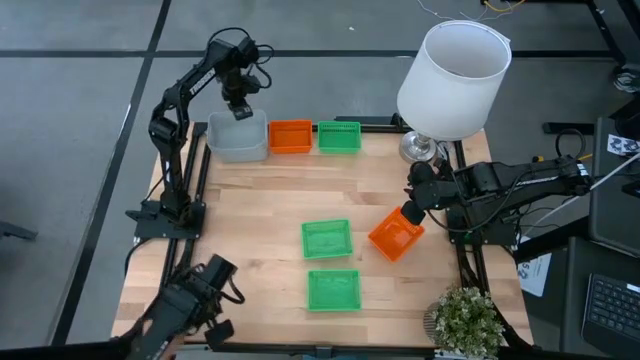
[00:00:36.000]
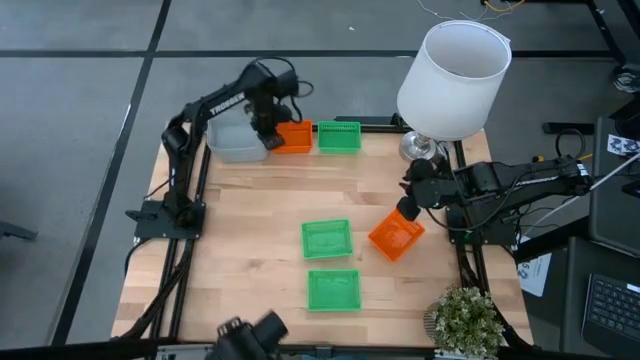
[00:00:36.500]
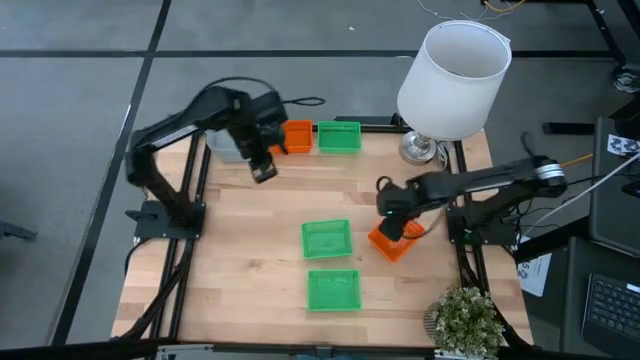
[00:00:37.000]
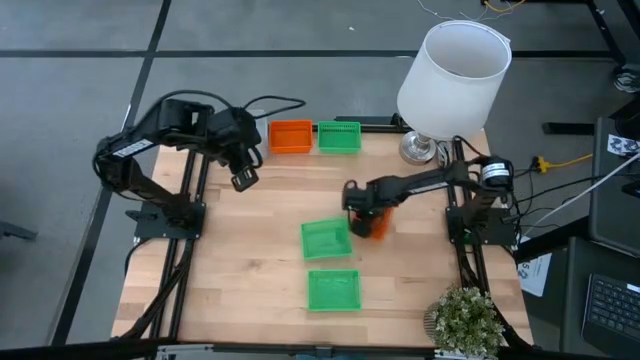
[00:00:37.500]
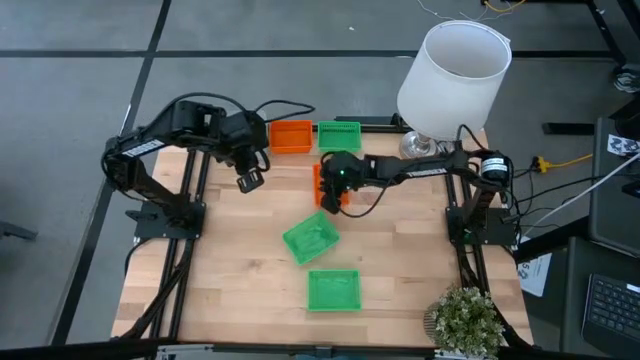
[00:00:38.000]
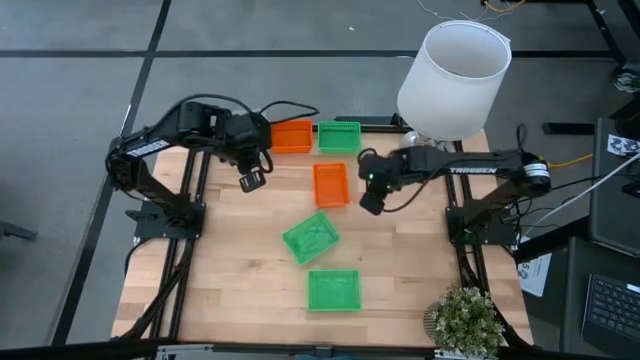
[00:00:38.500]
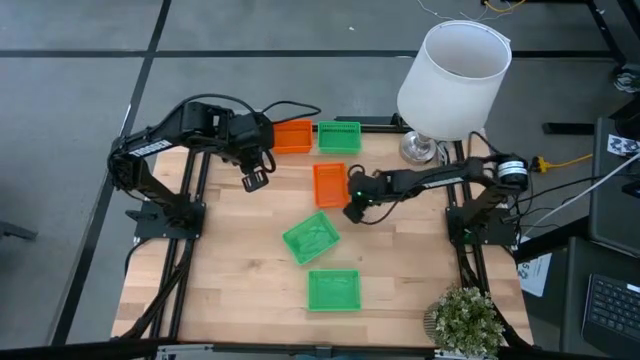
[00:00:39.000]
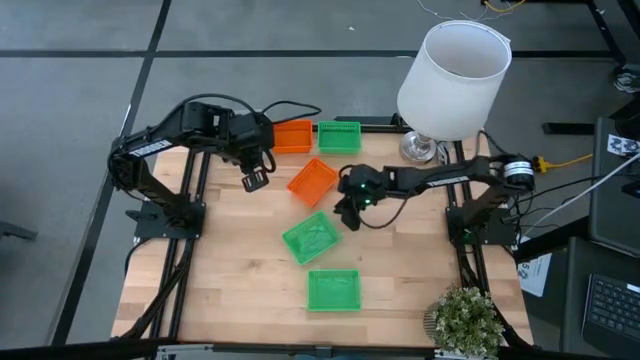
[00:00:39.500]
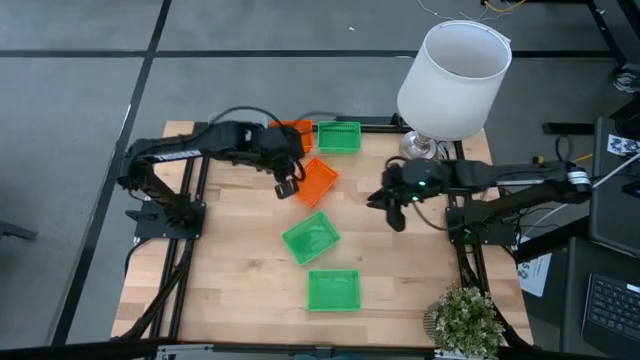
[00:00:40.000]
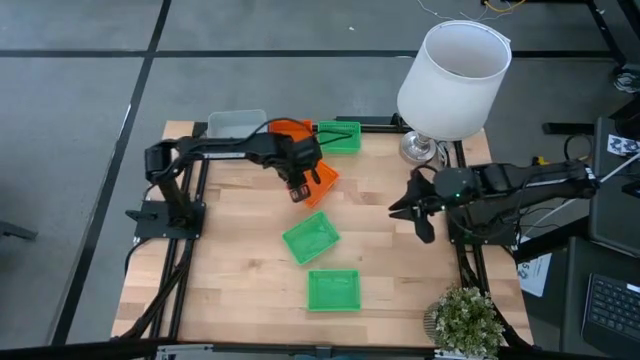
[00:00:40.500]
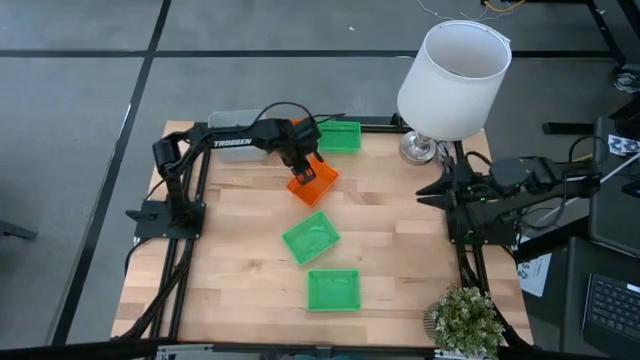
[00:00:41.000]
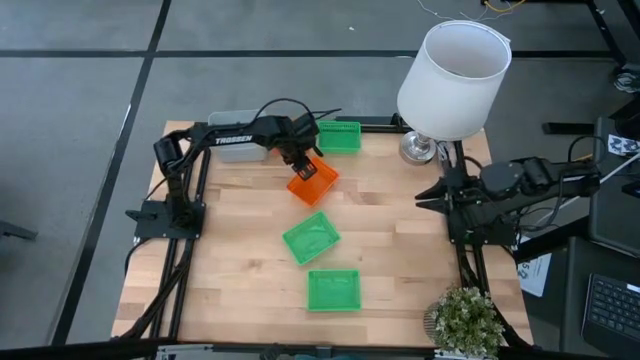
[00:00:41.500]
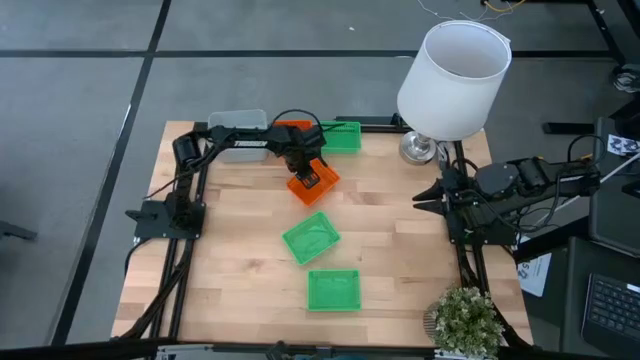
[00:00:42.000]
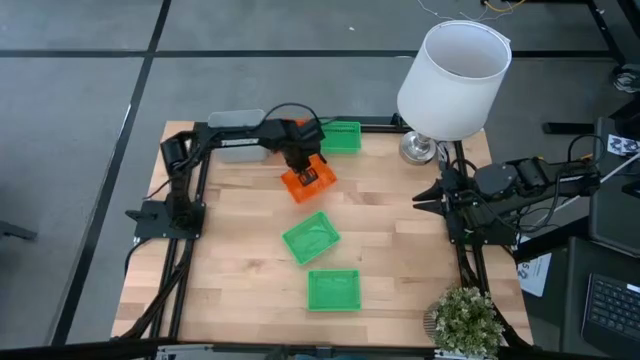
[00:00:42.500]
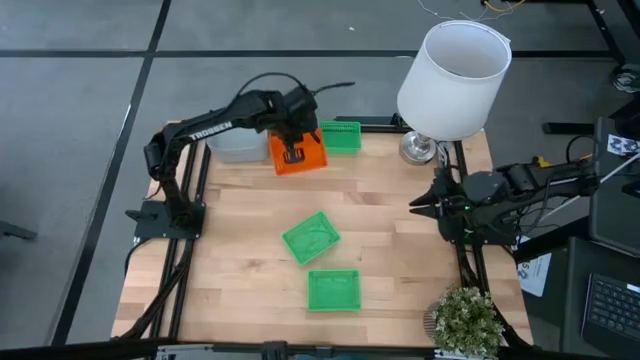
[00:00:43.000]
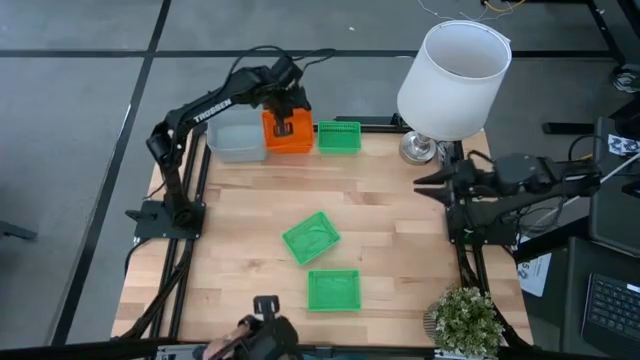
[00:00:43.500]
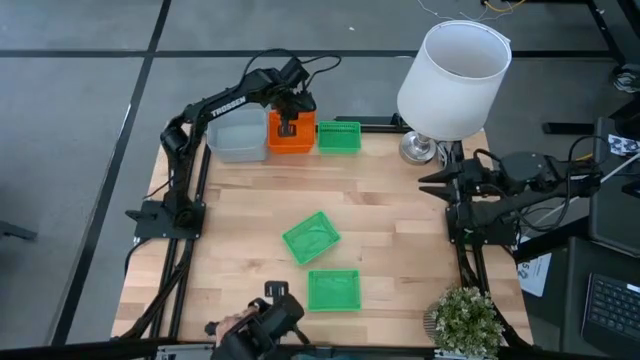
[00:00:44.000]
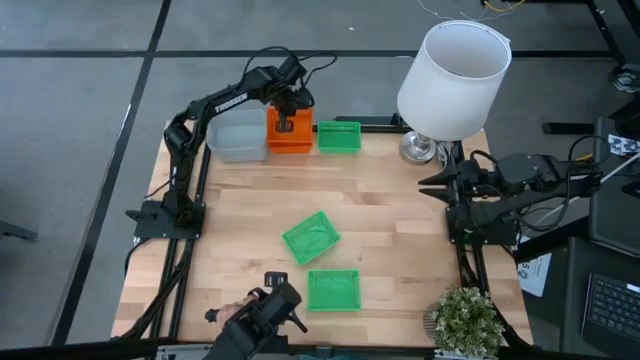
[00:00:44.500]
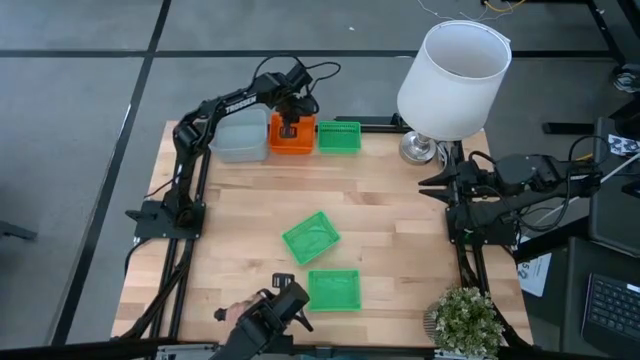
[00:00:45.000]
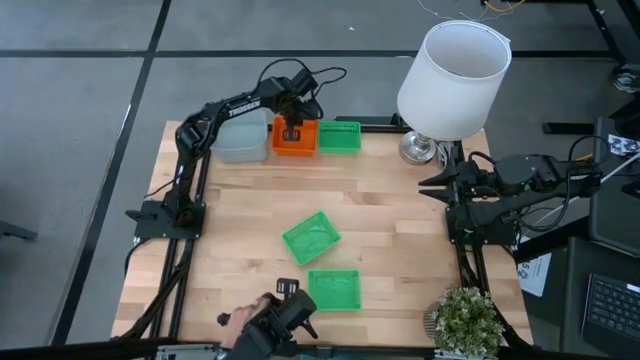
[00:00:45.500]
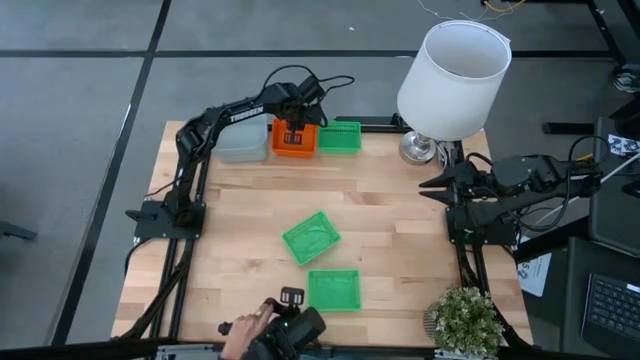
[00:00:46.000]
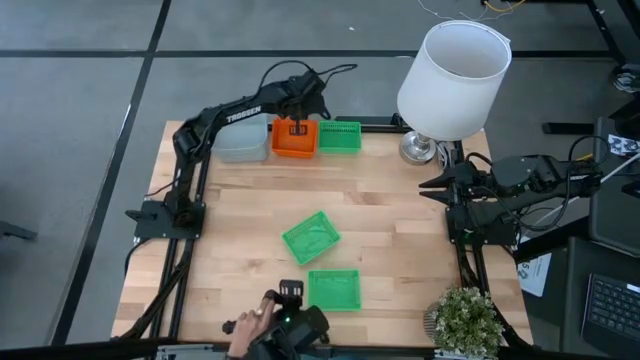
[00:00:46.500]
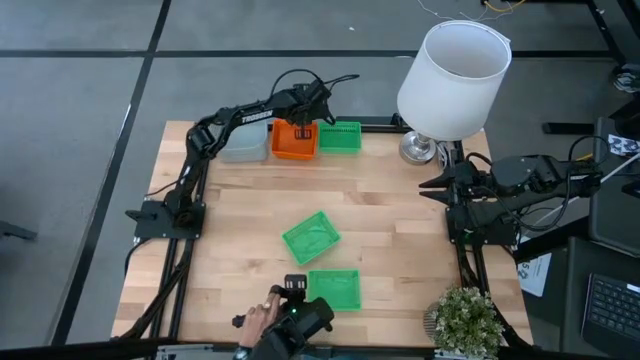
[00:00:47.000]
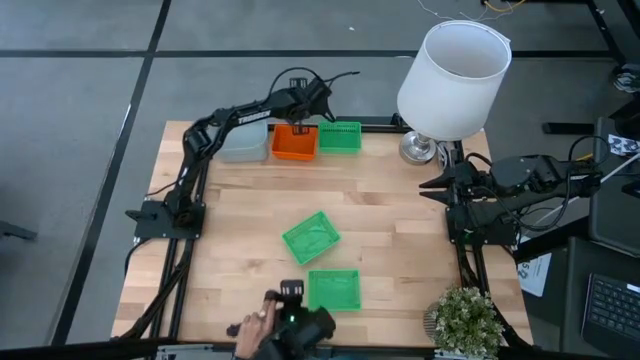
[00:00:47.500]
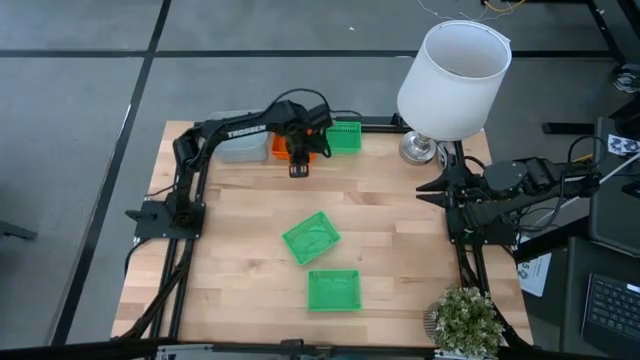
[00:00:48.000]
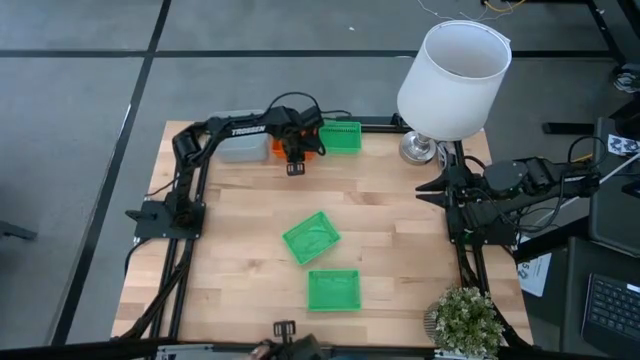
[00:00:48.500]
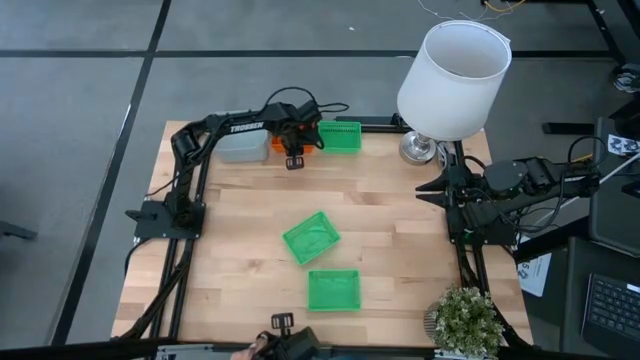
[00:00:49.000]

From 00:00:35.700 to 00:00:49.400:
Stack the bottom orange bin on the top orange bin

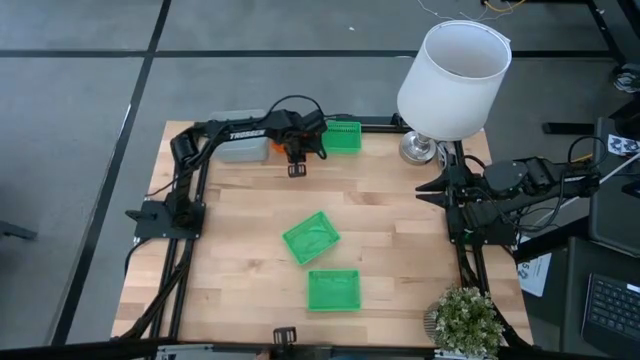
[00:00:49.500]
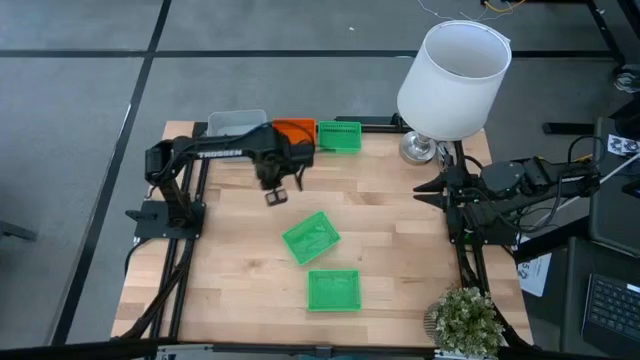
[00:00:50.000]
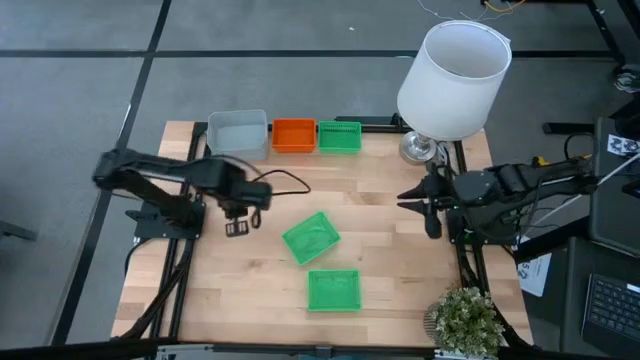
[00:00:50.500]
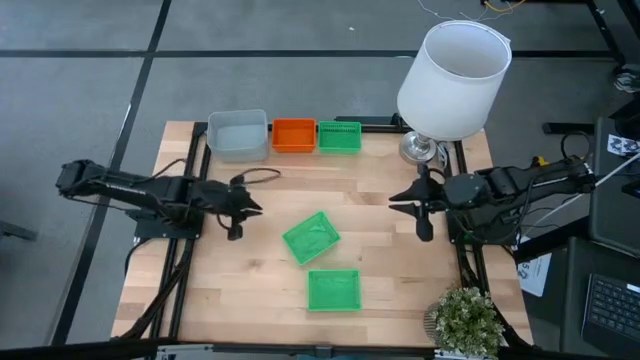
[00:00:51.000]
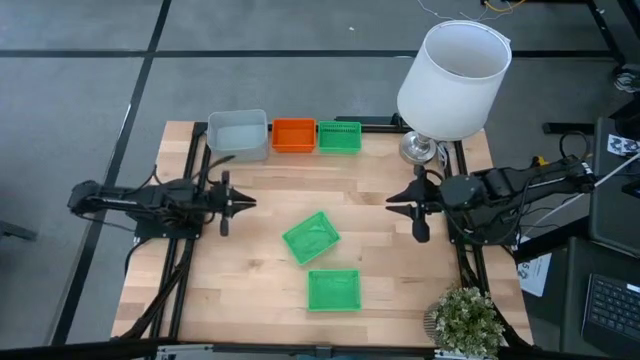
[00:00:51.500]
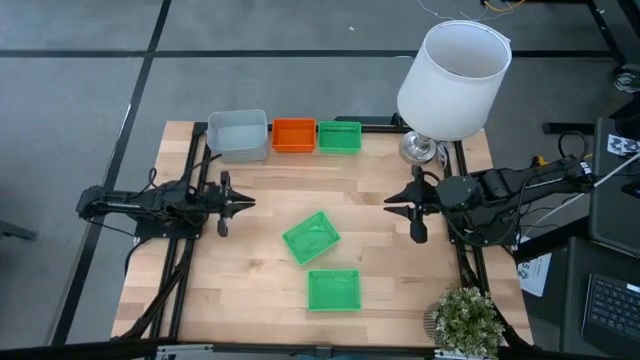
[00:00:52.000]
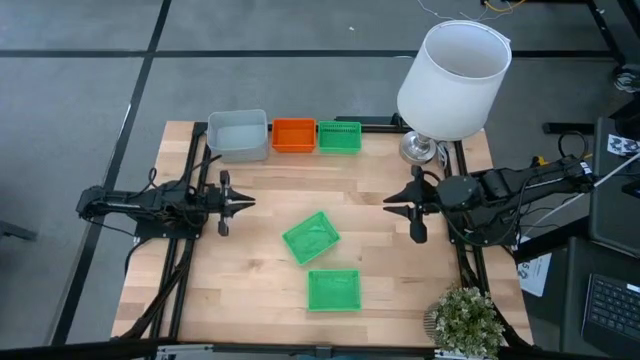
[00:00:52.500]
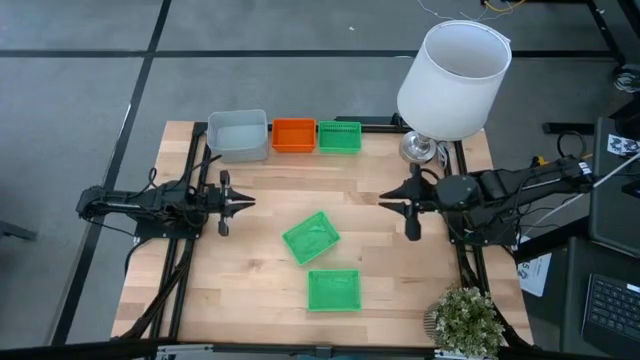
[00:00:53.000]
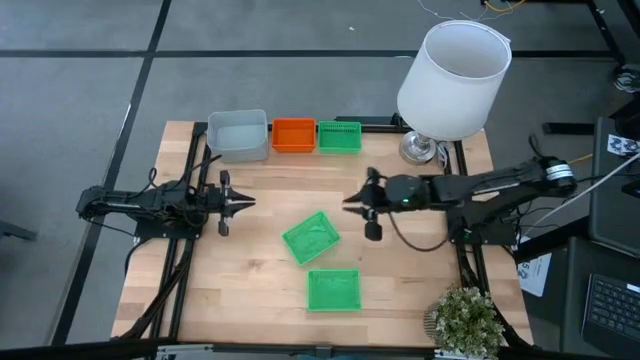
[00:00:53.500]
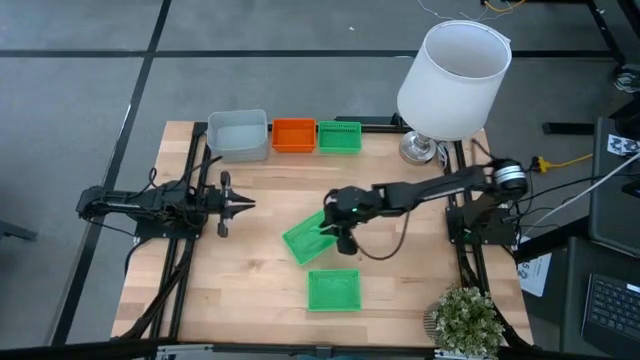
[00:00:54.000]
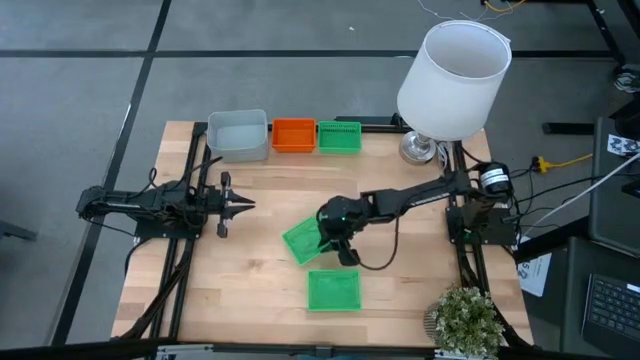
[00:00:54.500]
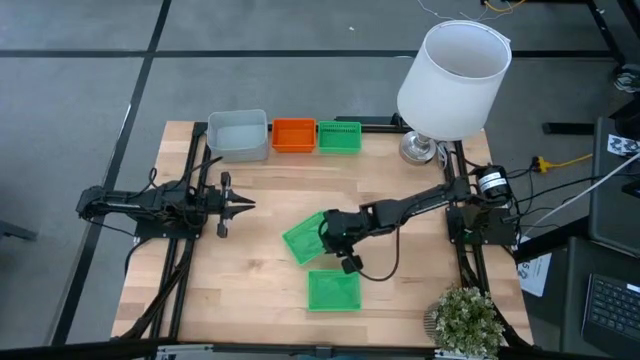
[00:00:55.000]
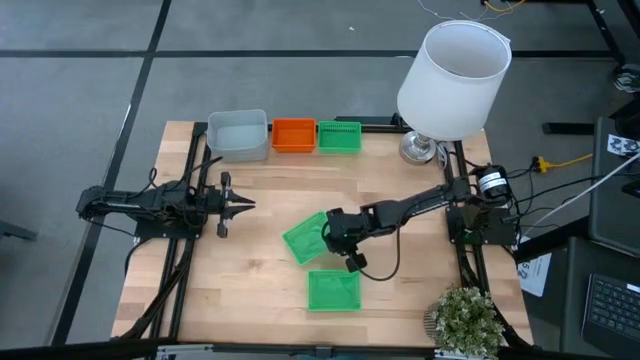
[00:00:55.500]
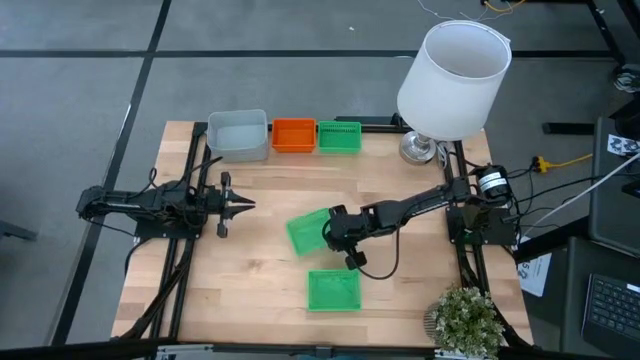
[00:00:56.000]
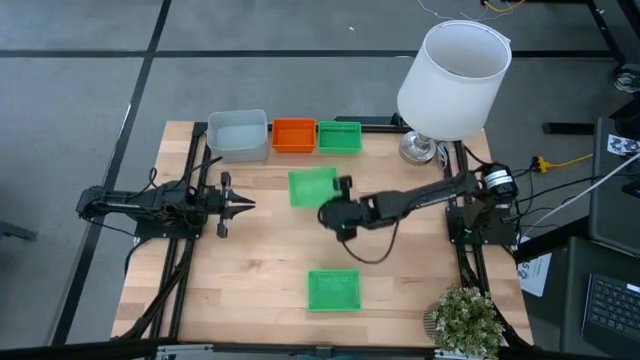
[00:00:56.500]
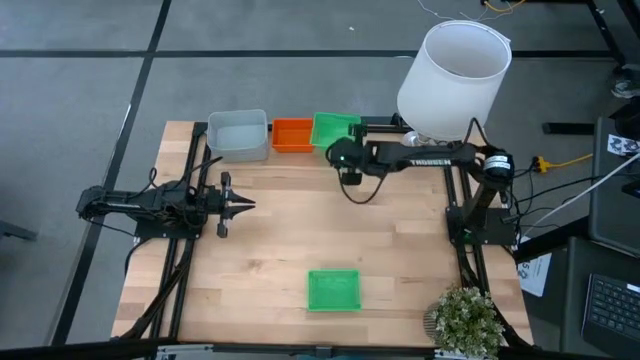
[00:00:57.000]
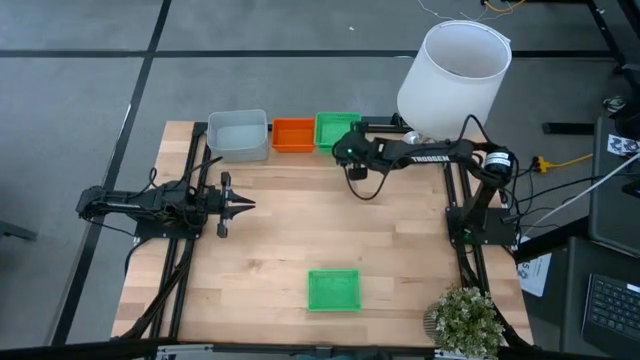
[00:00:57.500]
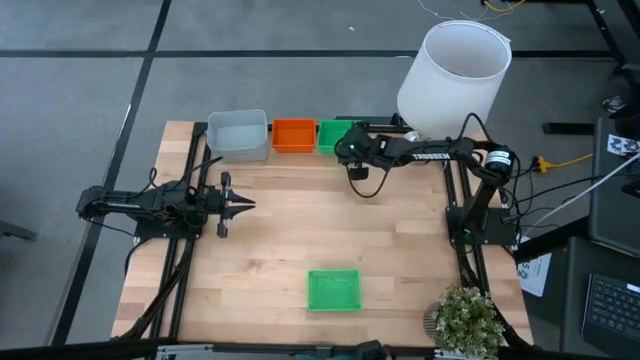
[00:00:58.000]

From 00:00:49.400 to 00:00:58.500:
Stack the middle green bin on the top green bin
